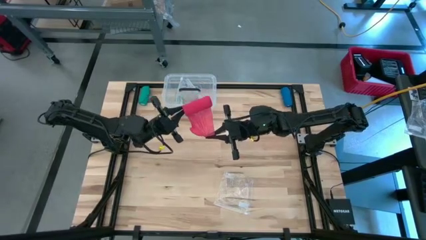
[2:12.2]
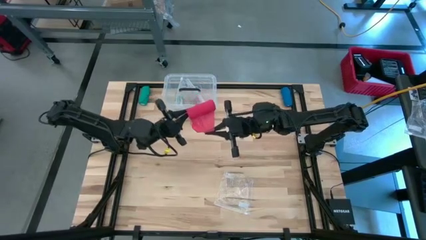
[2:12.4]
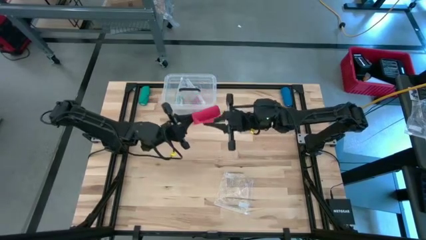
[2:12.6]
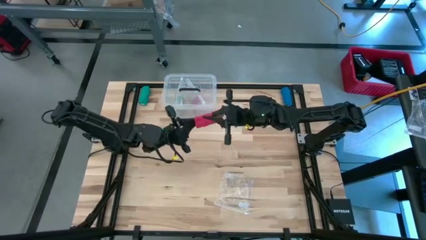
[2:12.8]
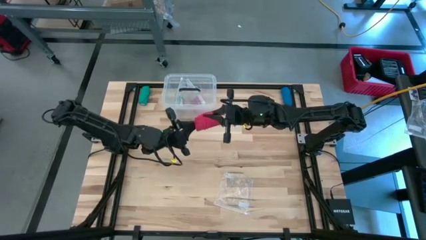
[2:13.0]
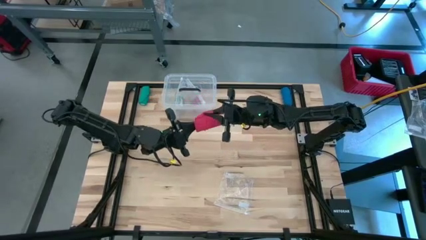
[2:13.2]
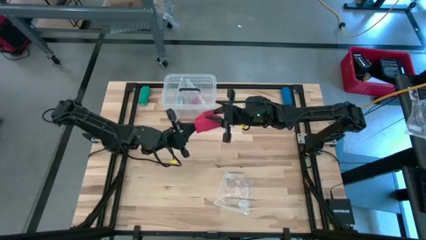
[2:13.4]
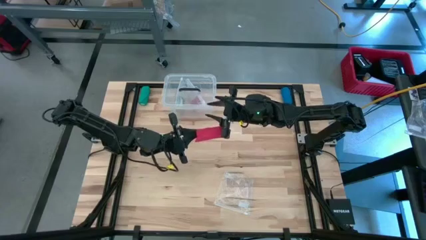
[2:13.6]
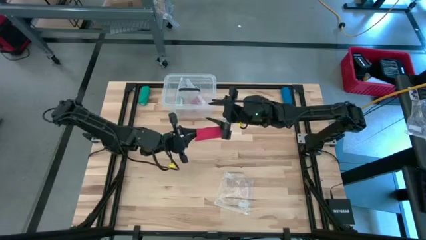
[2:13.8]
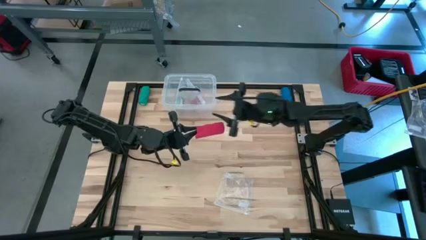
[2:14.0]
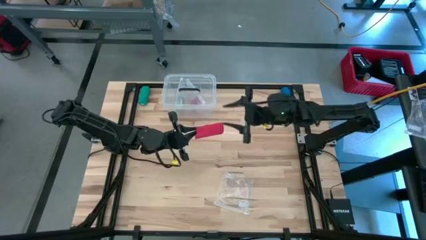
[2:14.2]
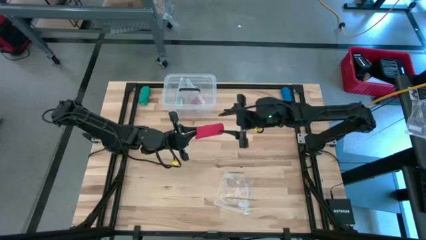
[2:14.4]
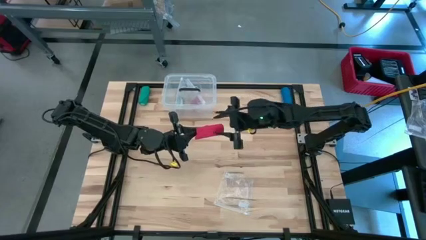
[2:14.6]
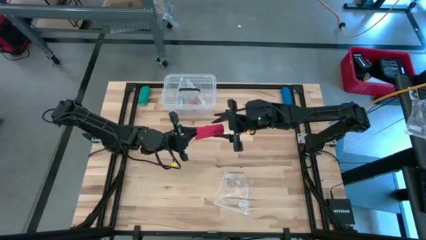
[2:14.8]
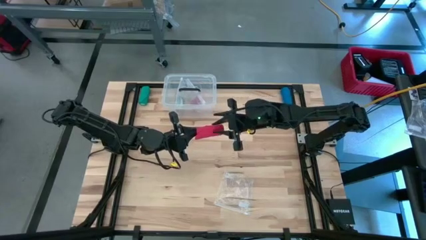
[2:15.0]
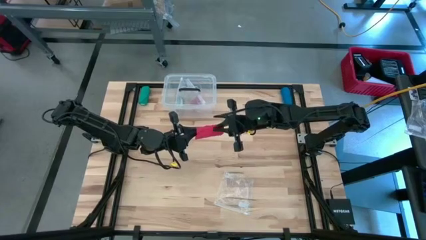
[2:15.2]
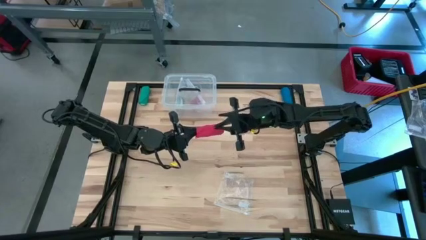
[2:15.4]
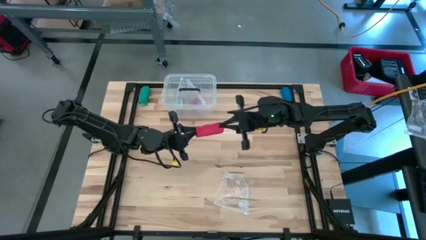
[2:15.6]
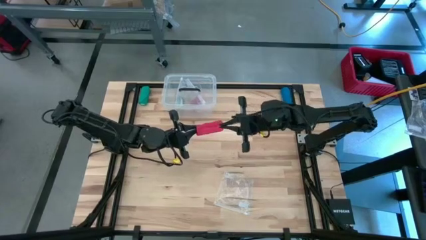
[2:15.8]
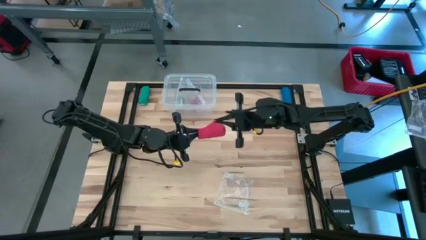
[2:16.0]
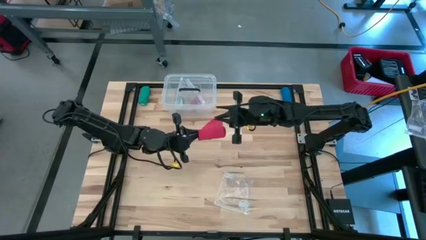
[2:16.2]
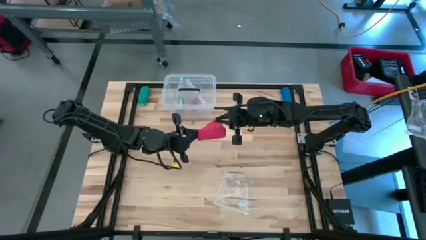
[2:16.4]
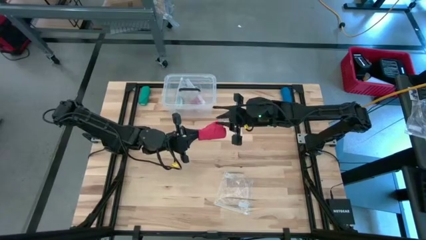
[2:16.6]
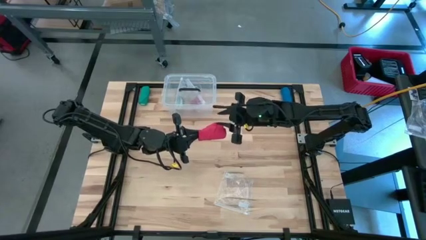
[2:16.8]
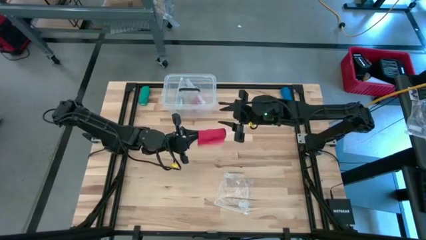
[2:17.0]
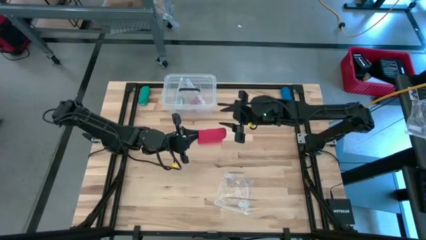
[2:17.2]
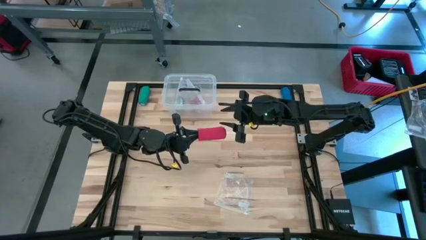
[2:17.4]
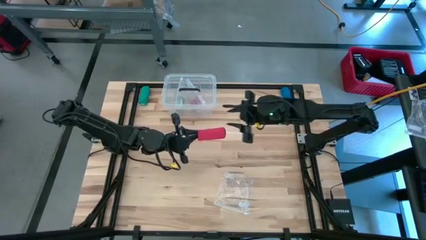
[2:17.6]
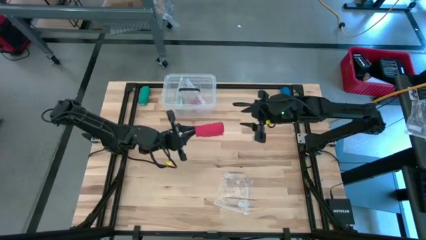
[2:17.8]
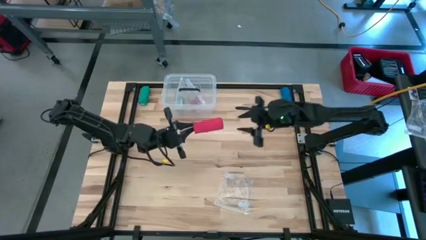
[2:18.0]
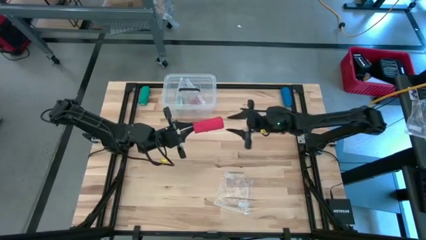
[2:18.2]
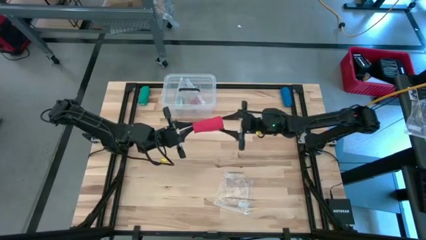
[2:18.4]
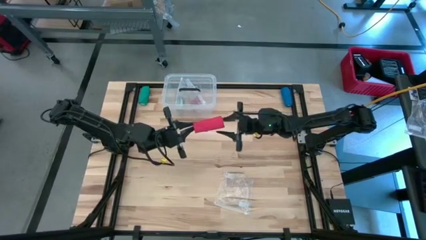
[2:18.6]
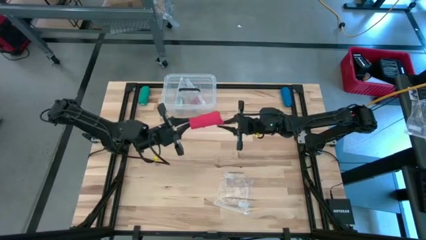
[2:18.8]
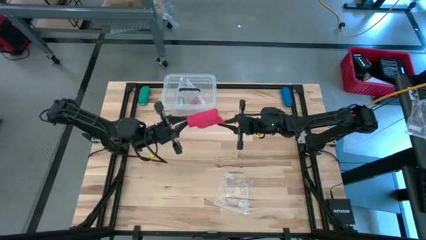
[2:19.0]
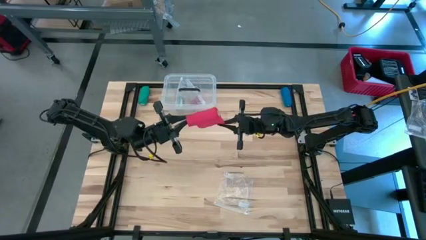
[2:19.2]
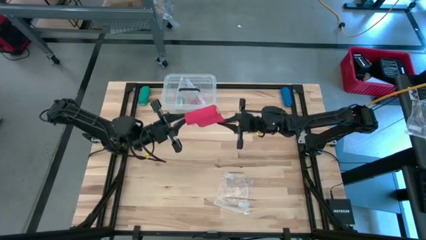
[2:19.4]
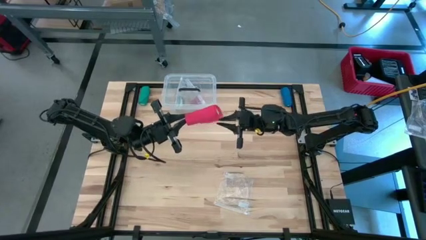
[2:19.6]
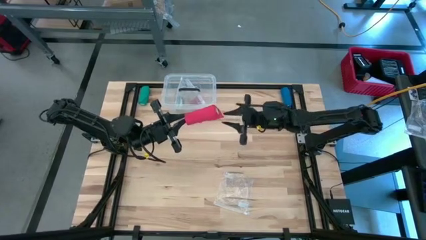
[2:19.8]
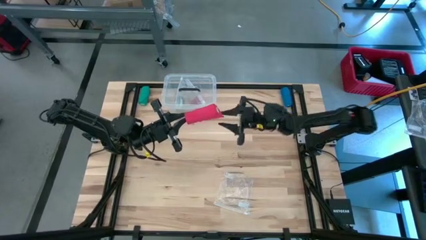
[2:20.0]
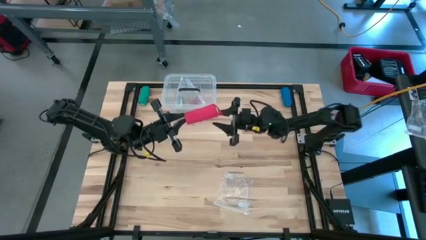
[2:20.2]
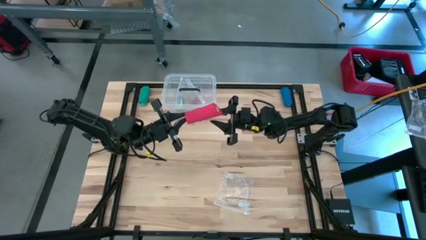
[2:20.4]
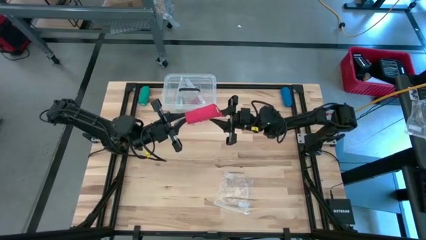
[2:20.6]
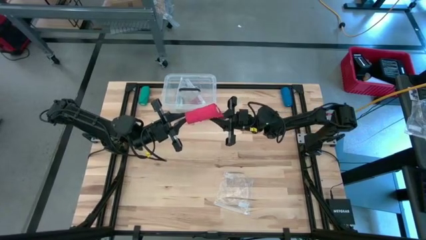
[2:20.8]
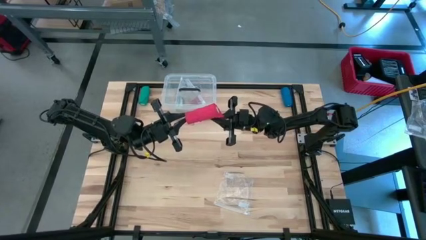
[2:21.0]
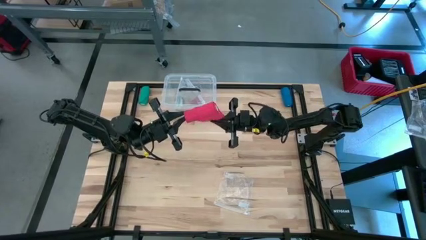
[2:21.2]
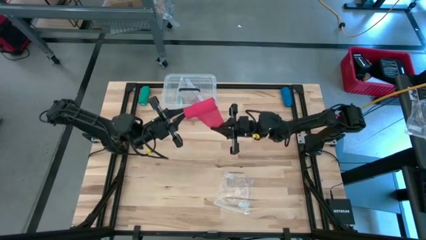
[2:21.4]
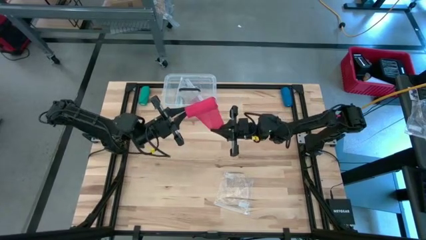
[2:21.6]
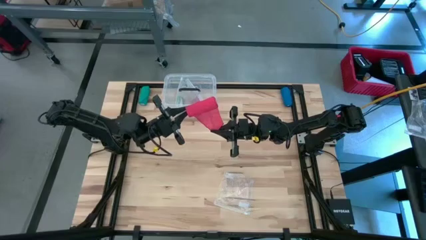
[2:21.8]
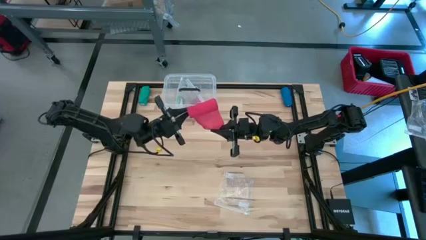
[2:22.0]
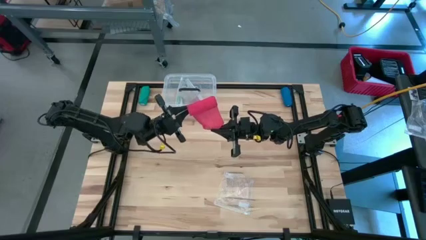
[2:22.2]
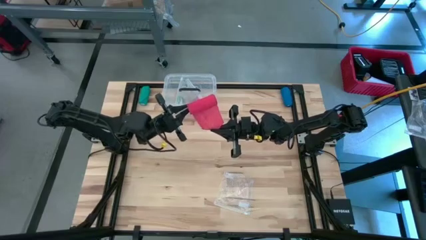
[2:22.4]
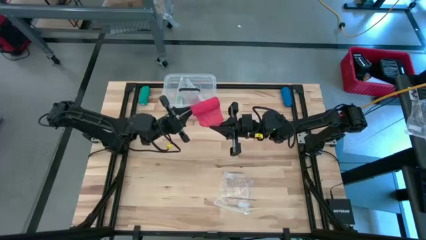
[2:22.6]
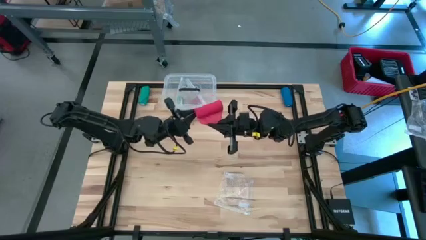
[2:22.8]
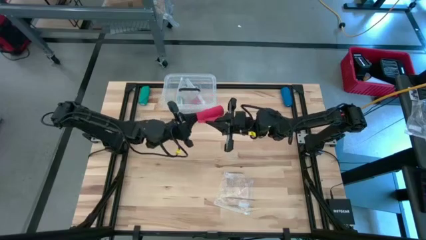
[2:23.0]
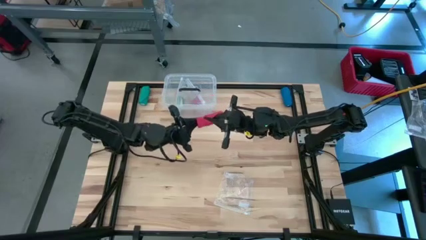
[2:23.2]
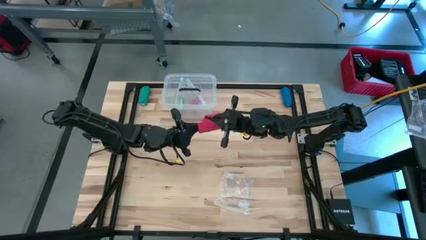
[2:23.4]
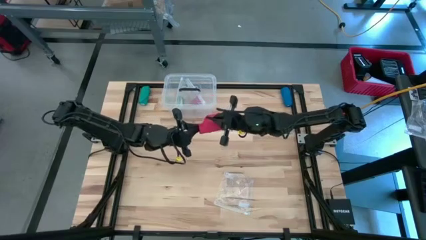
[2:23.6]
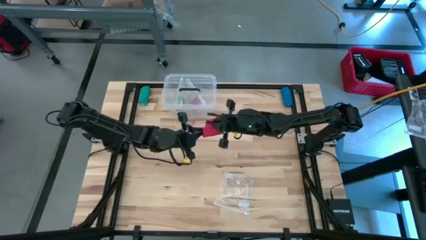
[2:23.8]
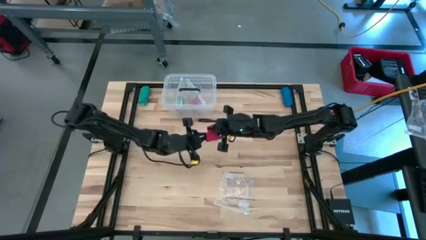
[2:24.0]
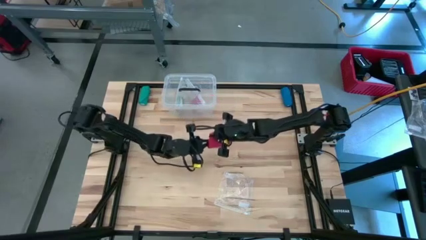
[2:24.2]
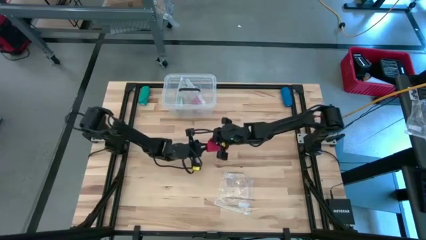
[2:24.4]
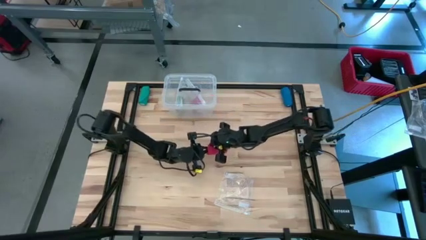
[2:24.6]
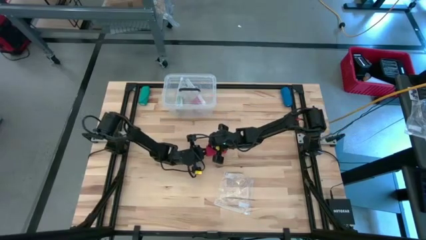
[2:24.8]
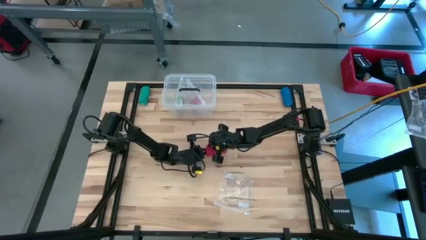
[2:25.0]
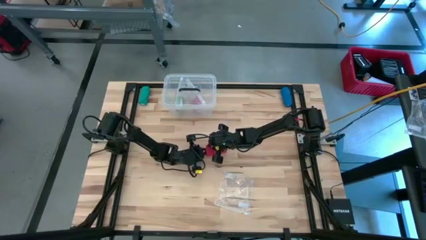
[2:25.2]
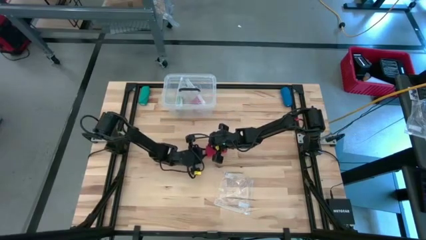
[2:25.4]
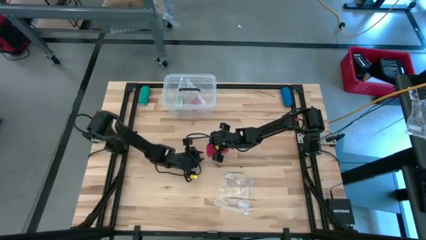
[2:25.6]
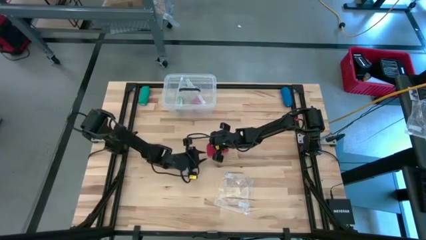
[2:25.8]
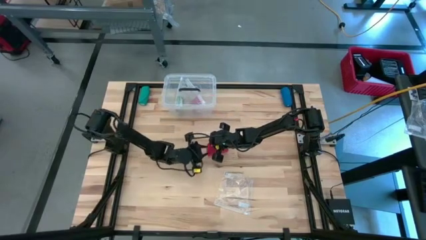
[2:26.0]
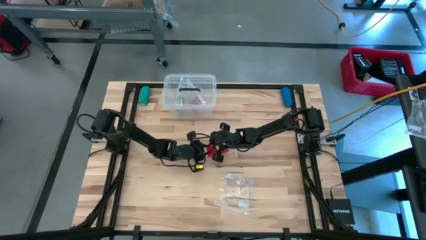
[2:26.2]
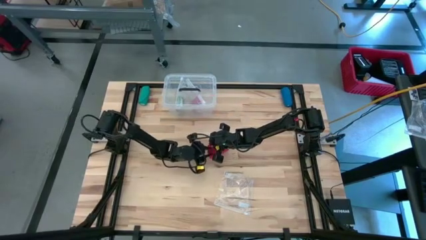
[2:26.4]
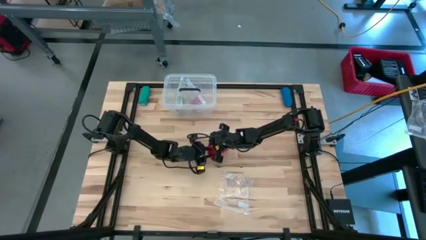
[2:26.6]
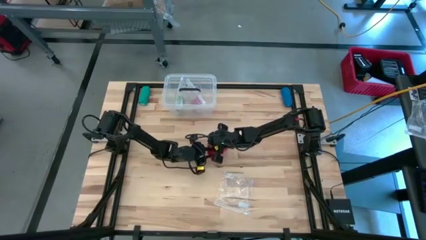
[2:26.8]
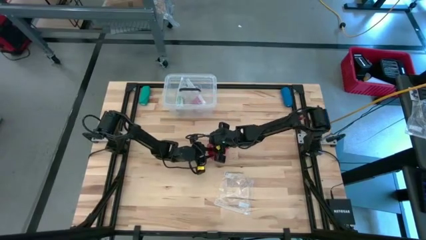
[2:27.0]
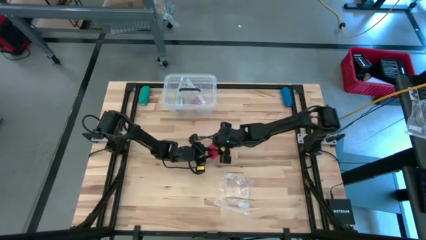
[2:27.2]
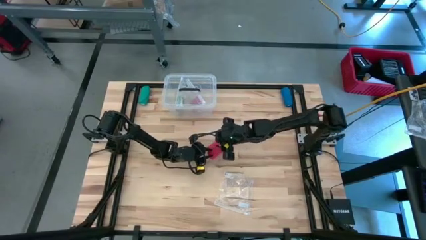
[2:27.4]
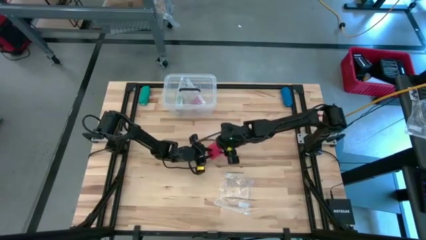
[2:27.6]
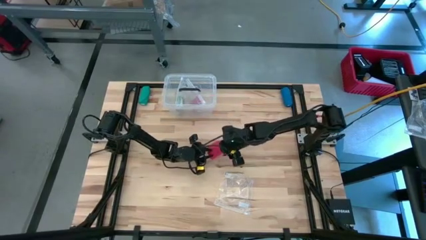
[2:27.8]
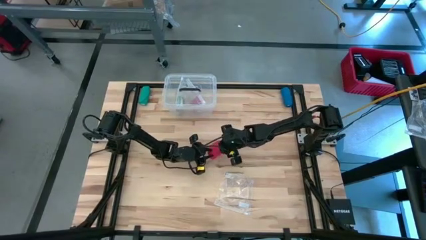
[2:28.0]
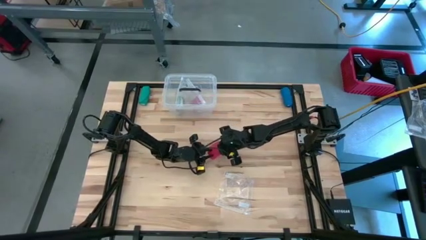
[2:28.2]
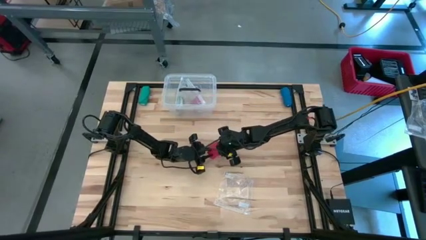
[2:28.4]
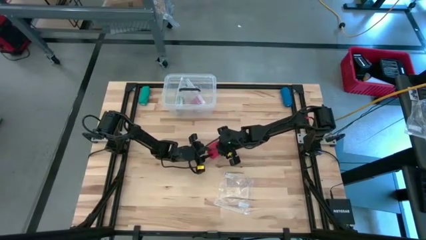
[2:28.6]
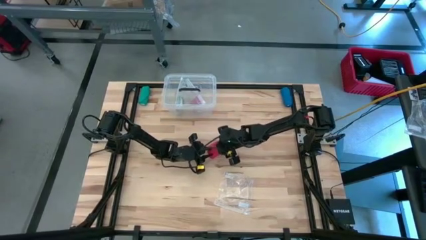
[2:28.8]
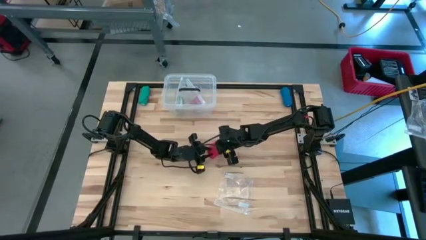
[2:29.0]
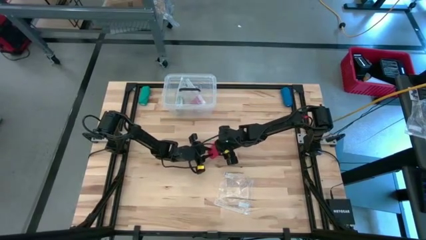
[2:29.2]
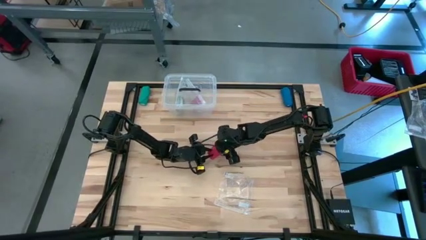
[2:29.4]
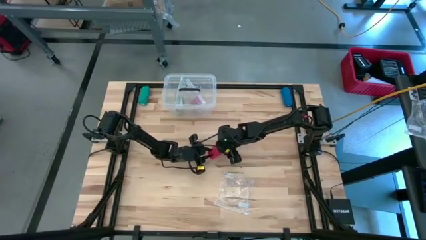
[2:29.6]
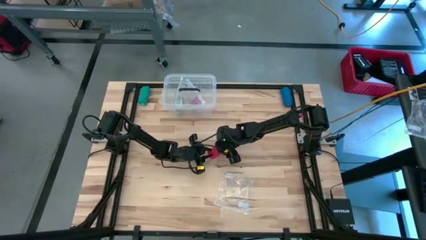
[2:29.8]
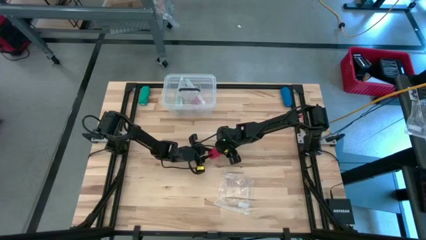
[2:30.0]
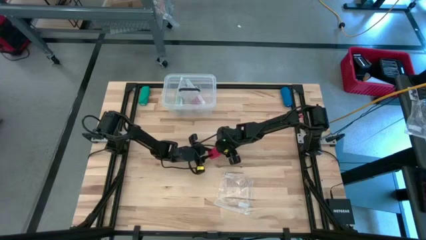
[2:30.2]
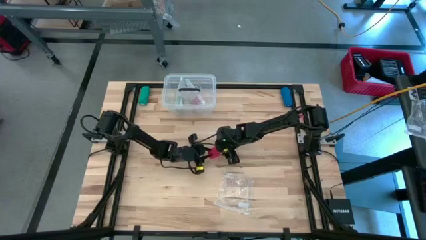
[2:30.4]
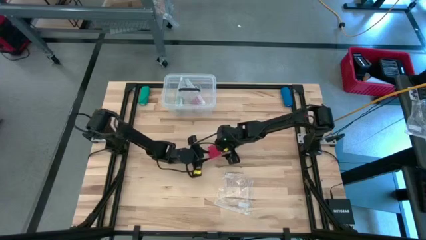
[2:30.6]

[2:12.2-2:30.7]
Task: Roll bandage
Roll the red bandage
